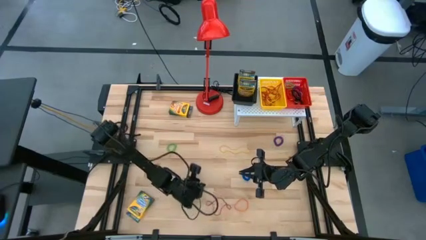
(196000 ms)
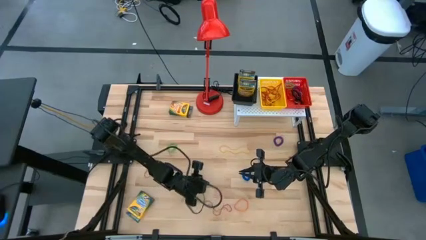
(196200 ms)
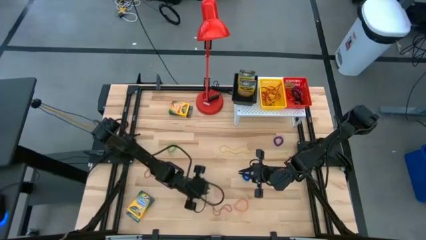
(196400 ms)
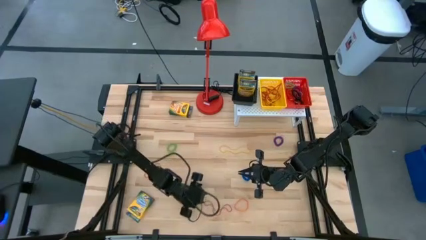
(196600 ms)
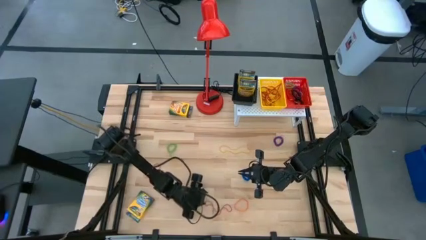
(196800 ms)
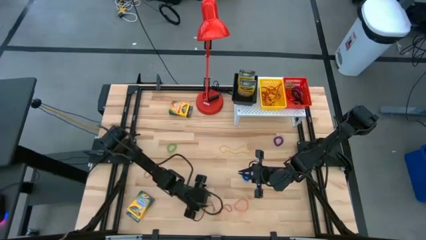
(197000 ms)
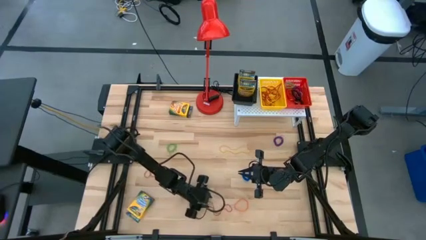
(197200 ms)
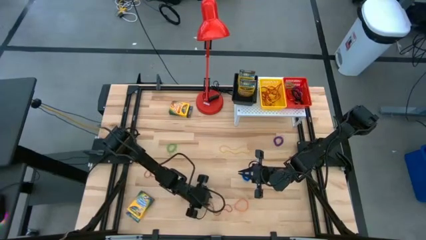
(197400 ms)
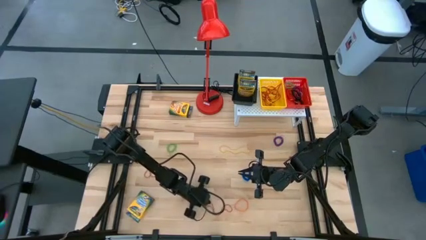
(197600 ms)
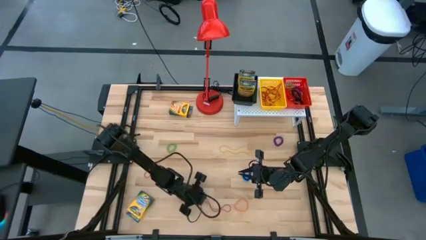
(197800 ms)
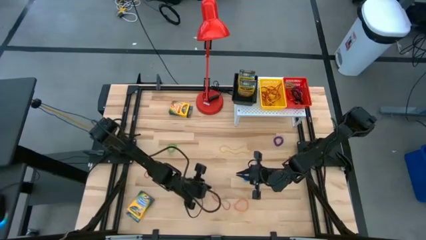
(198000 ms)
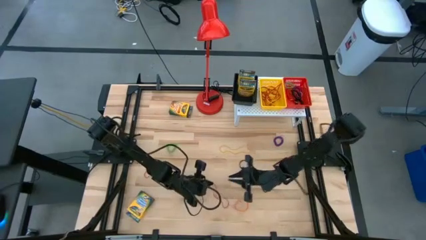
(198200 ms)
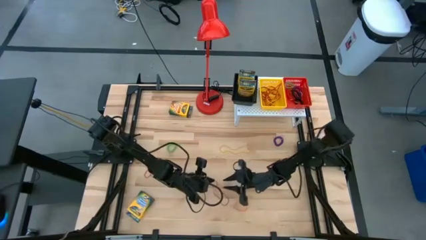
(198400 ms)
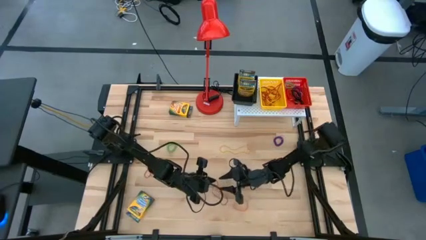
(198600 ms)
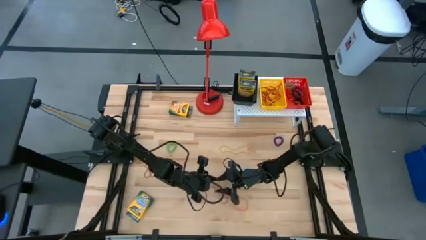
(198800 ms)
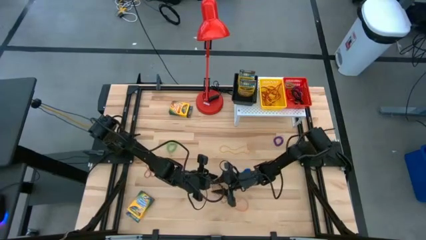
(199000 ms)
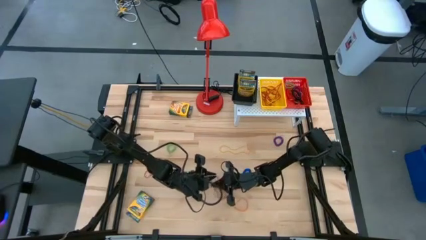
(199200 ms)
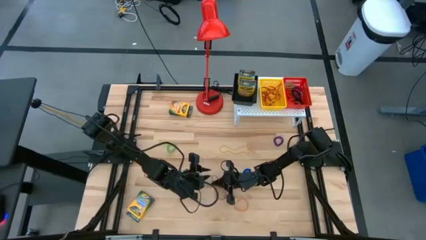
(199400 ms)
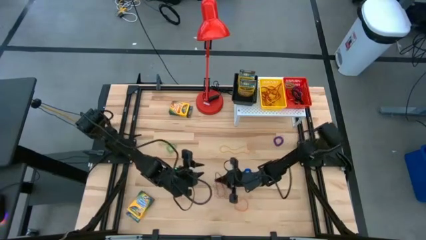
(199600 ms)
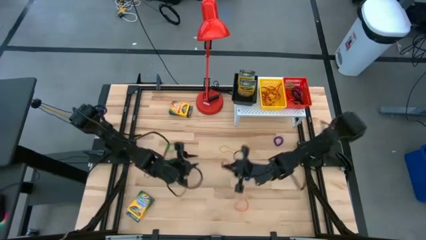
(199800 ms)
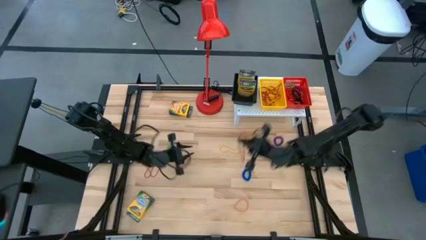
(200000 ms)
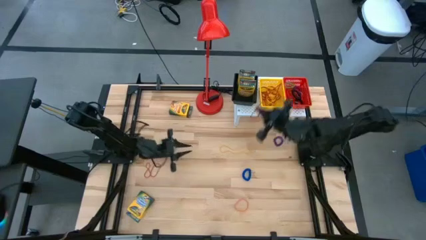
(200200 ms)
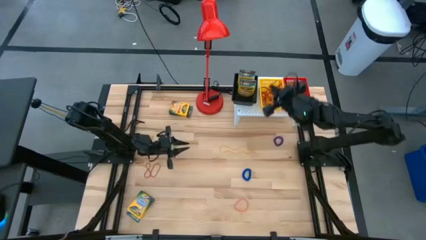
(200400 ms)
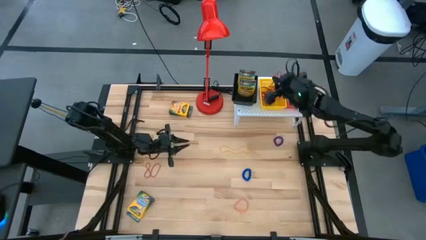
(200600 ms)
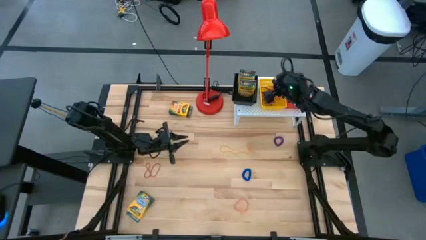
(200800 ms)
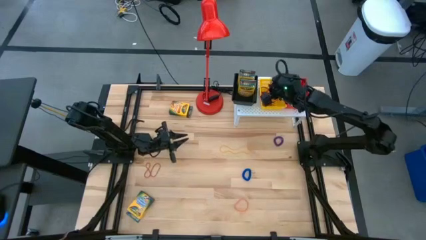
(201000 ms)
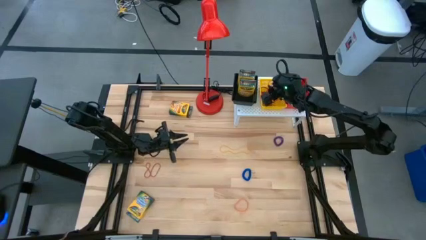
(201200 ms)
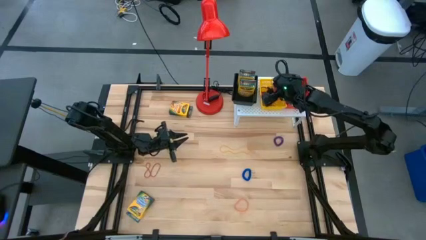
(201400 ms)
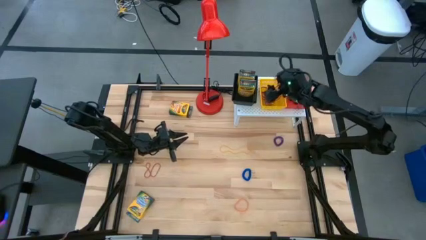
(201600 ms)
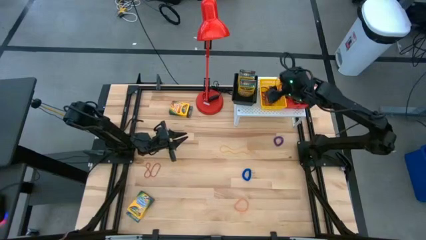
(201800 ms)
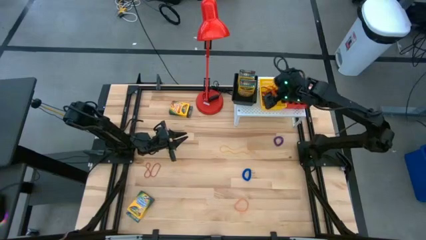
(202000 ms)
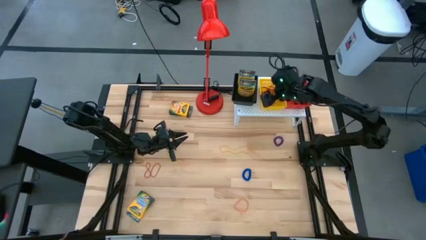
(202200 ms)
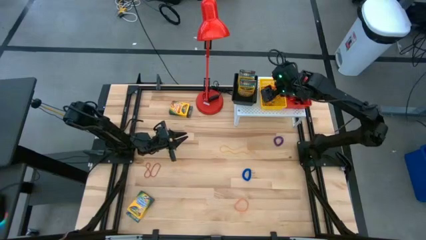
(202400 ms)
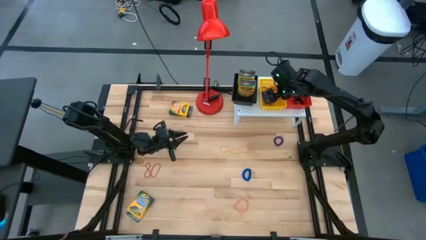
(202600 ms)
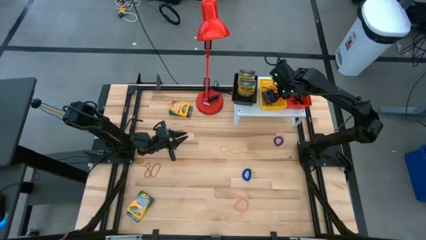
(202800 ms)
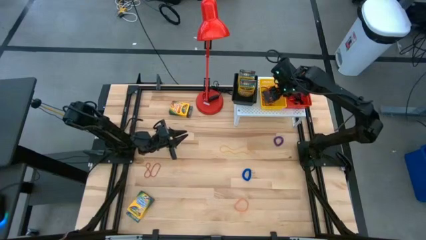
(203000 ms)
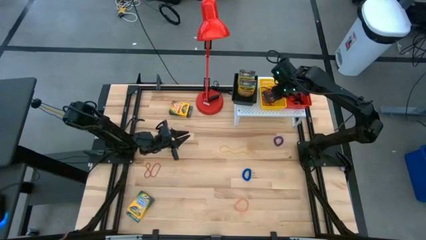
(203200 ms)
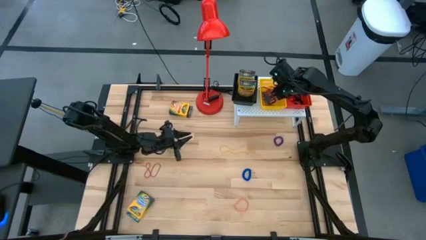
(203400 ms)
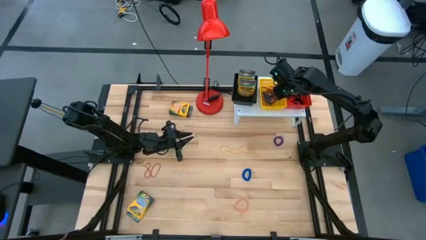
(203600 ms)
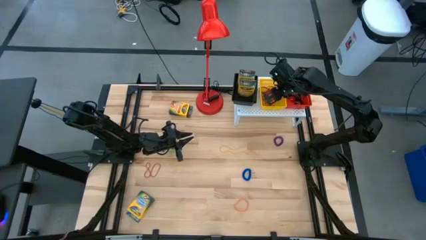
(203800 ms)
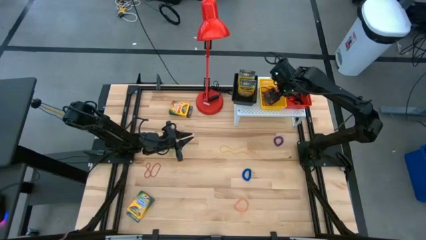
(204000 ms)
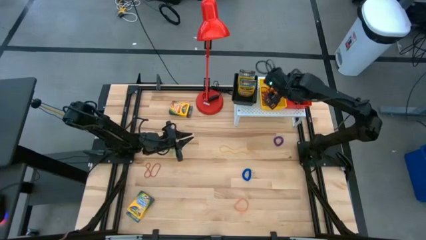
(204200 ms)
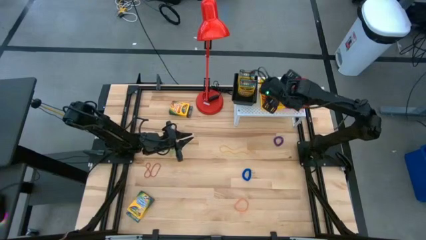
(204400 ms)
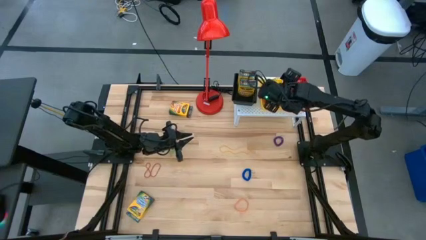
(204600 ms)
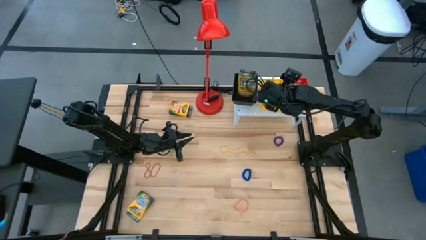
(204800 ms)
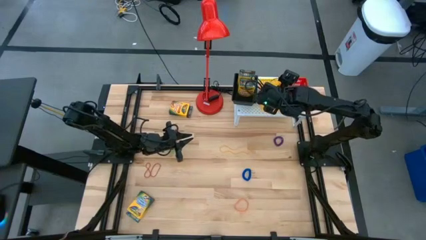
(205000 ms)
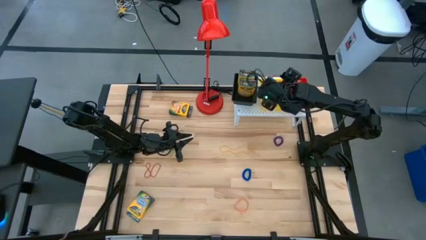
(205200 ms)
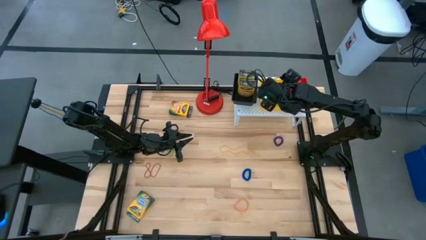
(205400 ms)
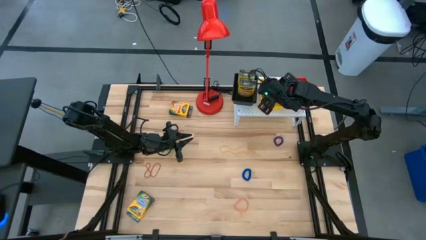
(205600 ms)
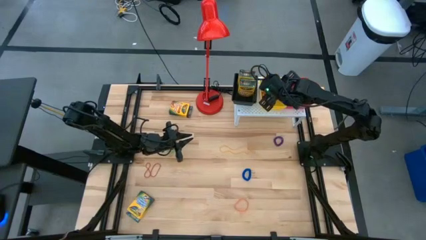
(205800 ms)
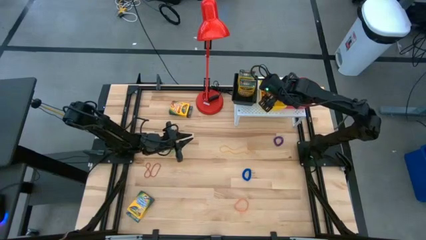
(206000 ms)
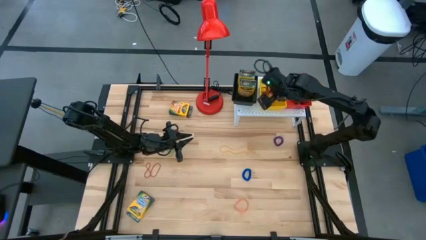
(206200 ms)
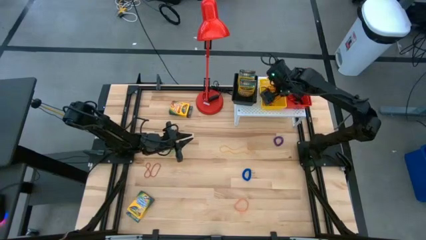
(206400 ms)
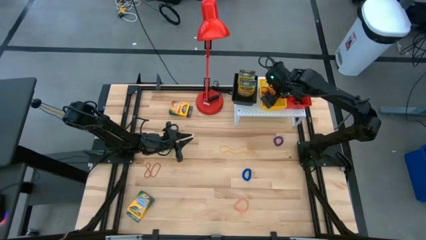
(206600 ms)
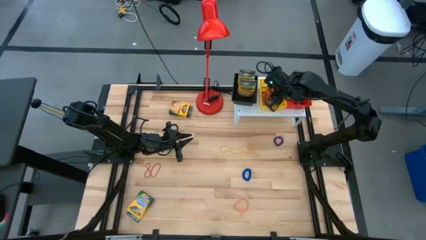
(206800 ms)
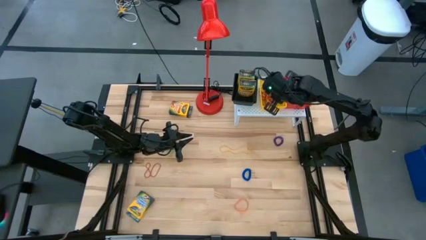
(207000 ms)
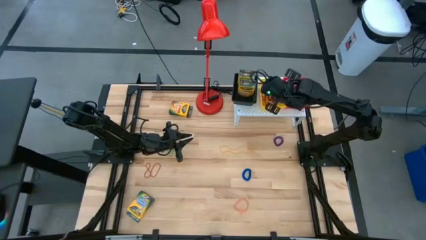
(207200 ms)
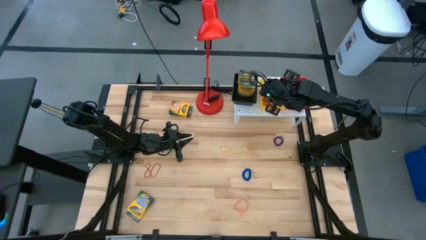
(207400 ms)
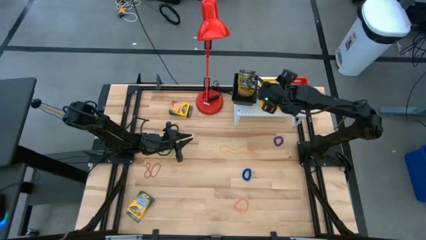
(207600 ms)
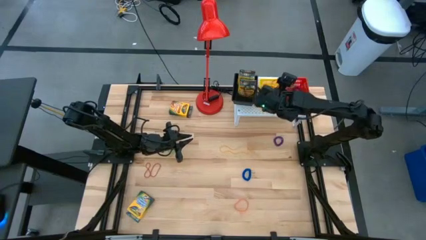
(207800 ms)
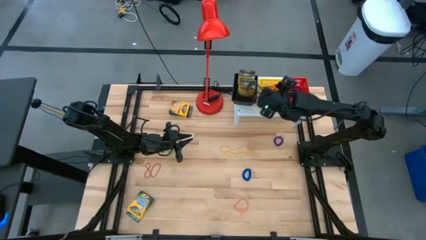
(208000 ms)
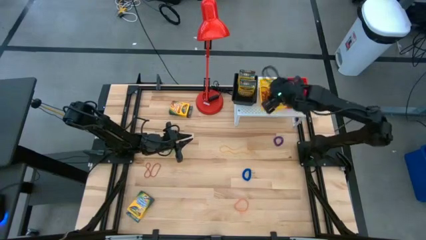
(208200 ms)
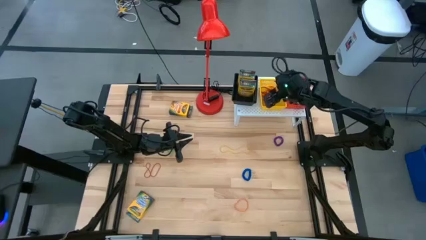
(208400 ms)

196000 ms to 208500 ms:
Task: Pick & Place Office Desk Supplies
Put the right red rubber band into the yellow bin

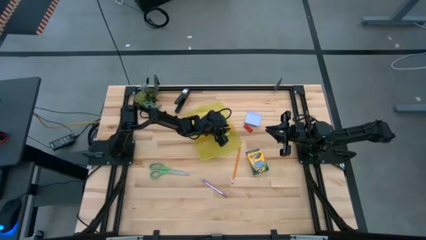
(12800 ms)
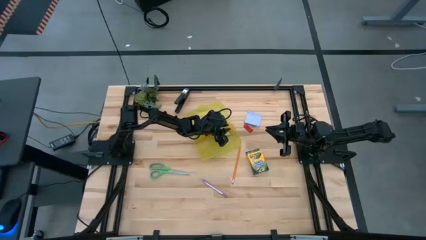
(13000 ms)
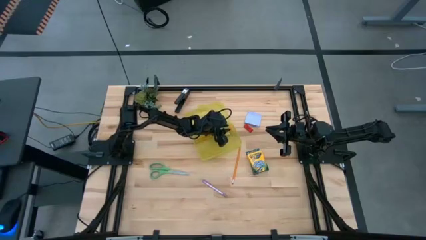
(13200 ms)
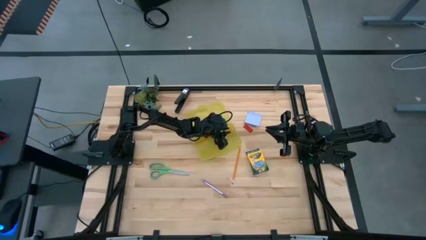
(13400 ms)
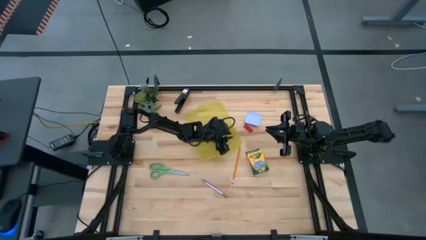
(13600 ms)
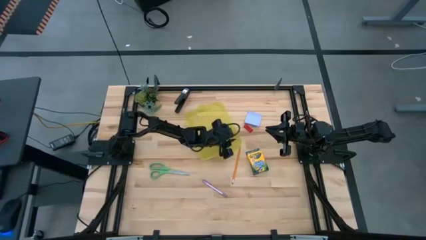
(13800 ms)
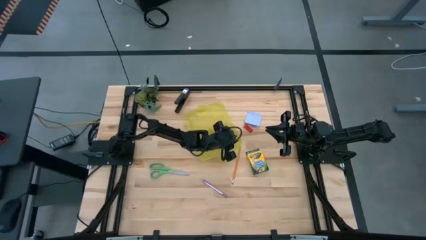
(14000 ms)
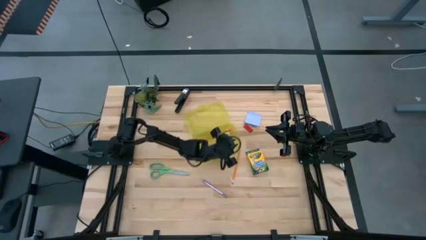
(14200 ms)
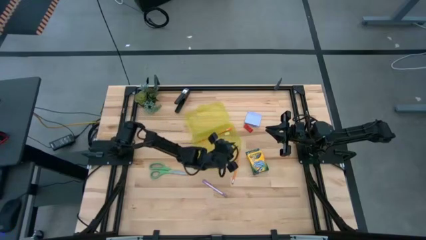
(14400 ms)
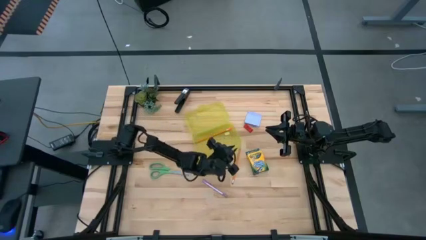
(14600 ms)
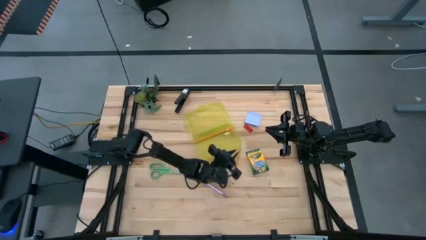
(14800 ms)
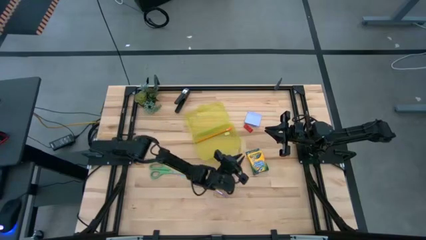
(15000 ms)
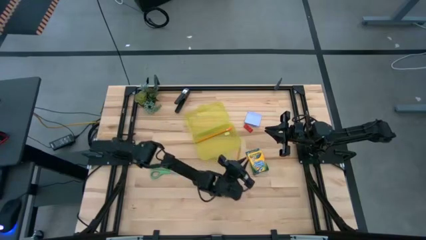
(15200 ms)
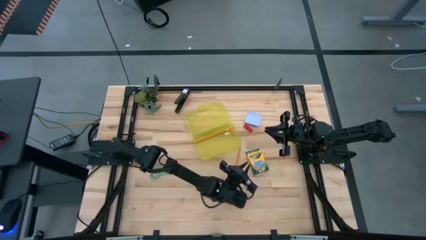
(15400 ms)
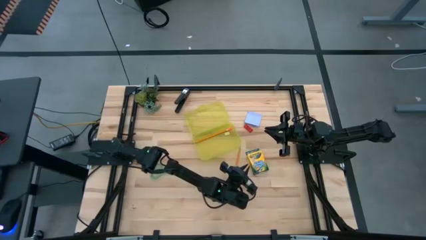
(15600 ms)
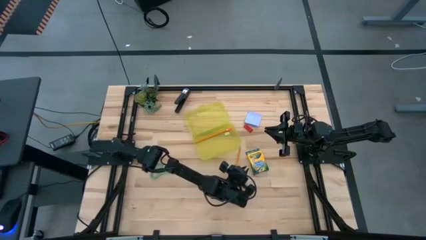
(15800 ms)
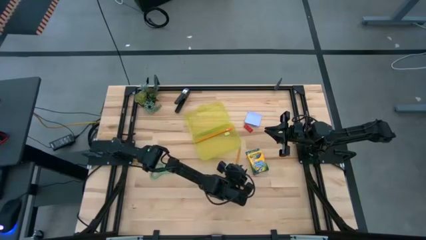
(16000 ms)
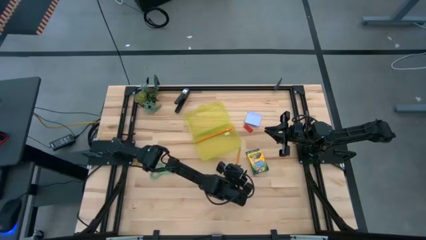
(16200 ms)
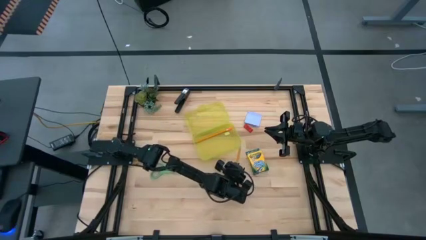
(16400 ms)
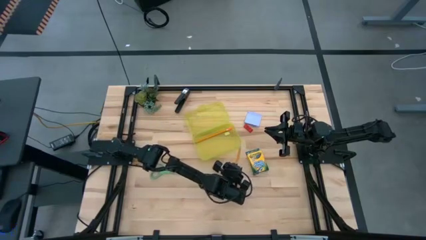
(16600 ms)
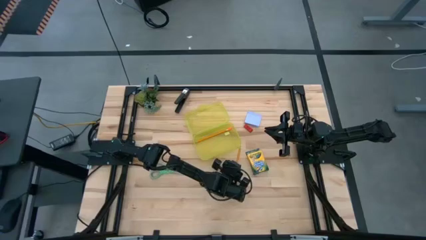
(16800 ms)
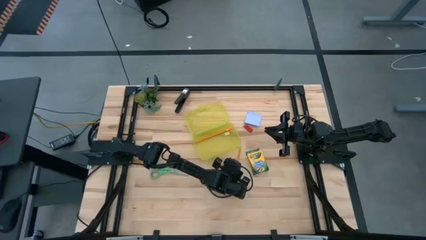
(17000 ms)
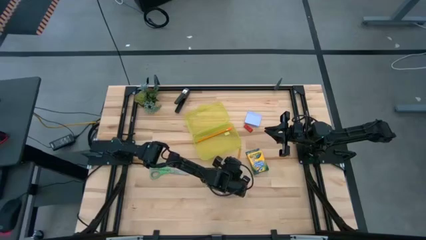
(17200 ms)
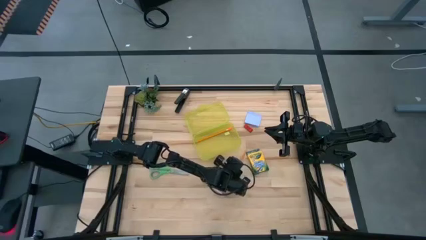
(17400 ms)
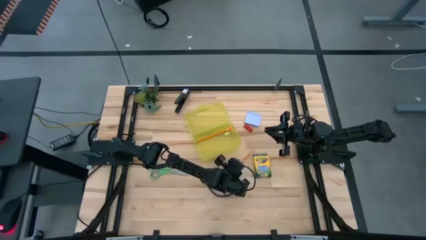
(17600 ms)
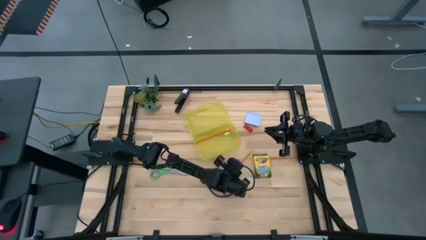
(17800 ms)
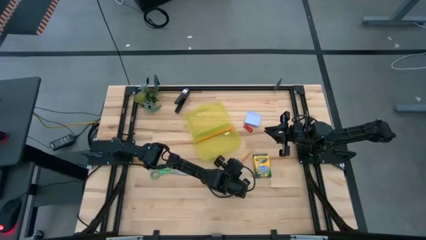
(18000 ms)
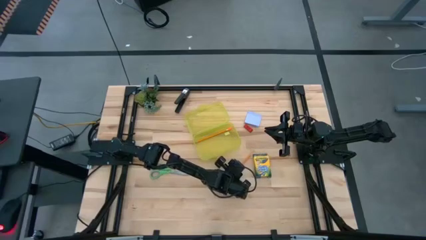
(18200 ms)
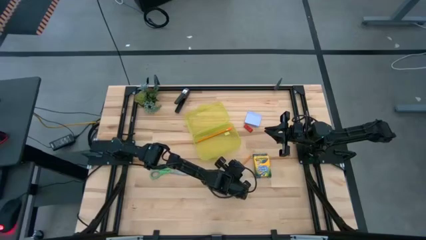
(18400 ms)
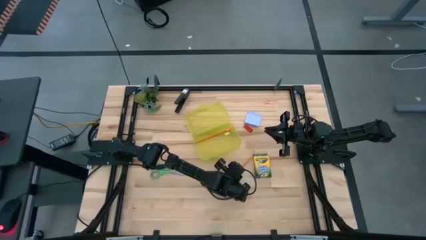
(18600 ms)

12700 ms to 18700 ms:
Task: Pack school essentials
Put the yellow pencil into the yellow supply box
